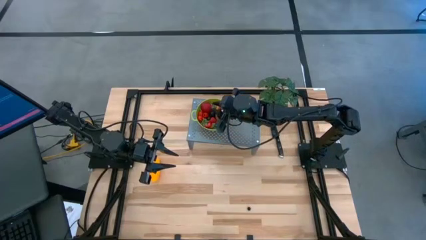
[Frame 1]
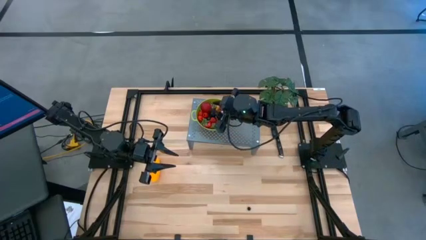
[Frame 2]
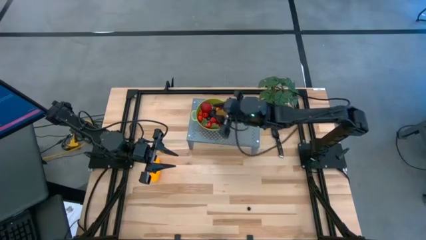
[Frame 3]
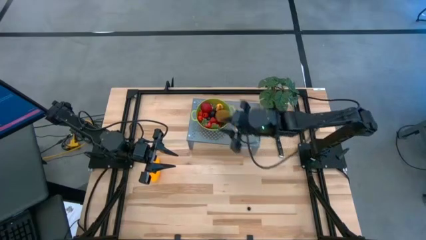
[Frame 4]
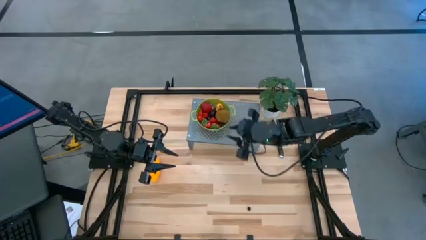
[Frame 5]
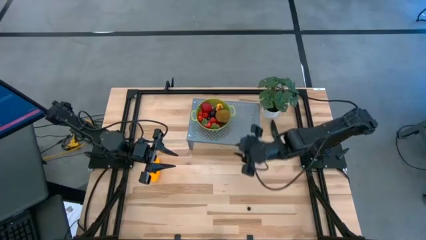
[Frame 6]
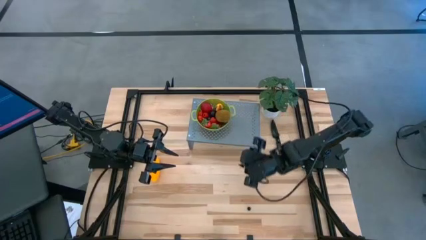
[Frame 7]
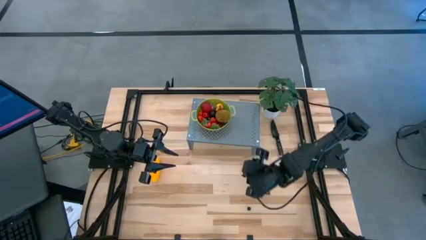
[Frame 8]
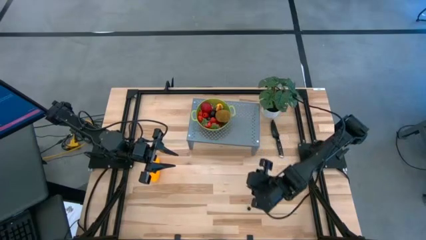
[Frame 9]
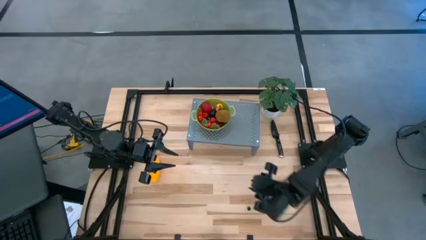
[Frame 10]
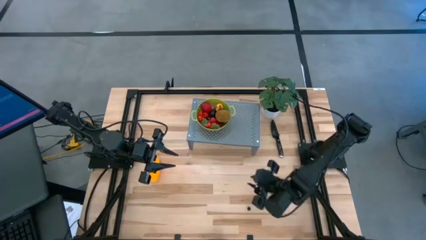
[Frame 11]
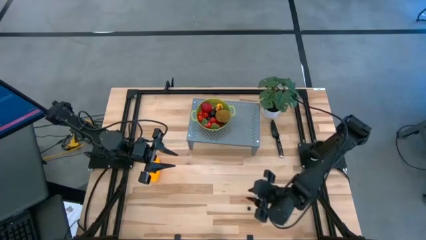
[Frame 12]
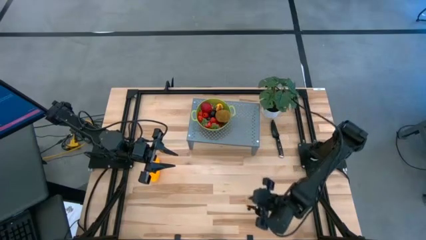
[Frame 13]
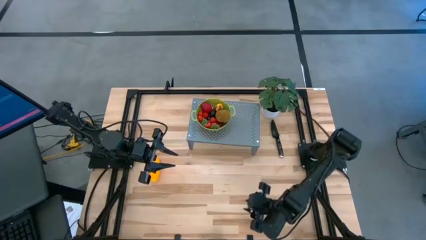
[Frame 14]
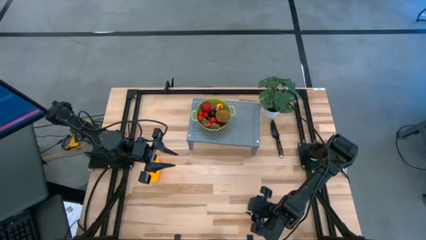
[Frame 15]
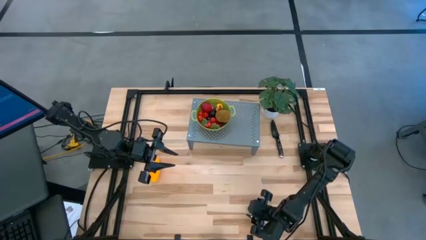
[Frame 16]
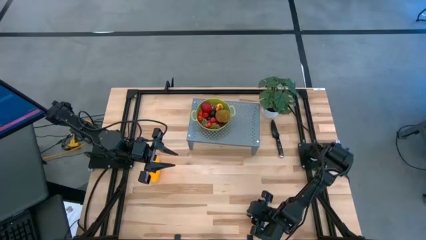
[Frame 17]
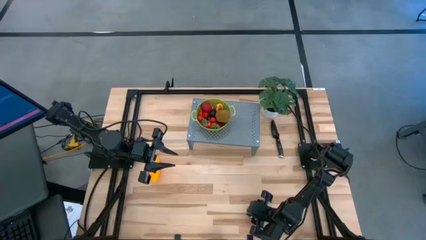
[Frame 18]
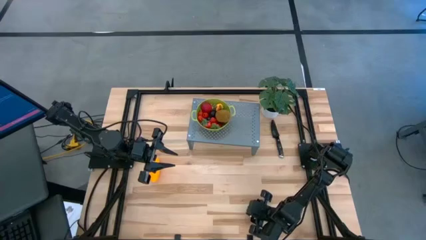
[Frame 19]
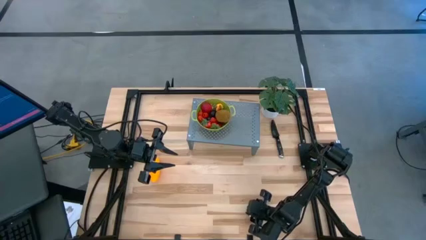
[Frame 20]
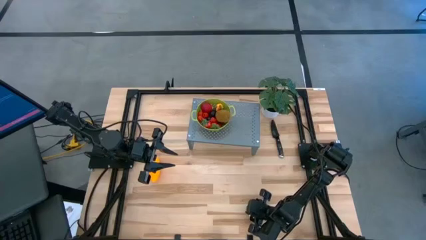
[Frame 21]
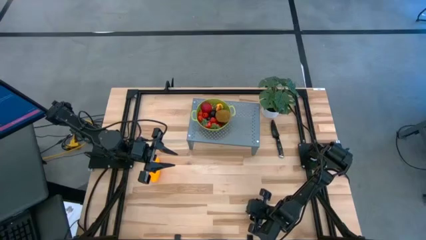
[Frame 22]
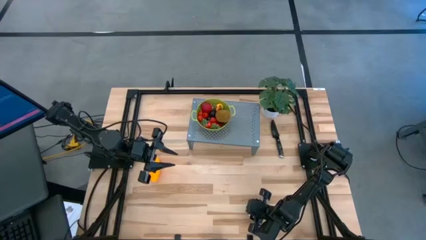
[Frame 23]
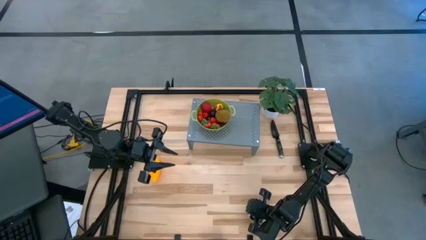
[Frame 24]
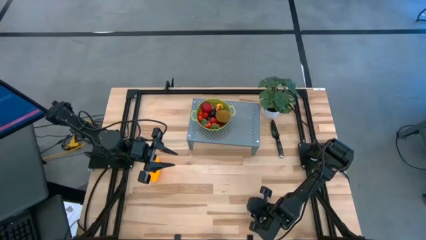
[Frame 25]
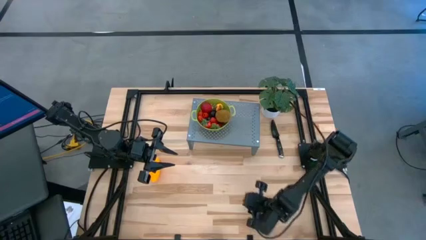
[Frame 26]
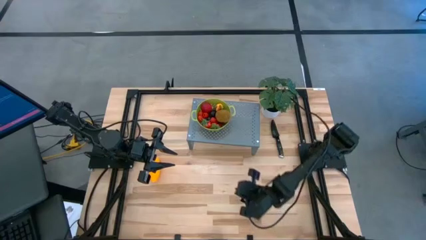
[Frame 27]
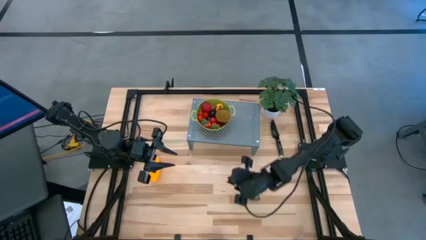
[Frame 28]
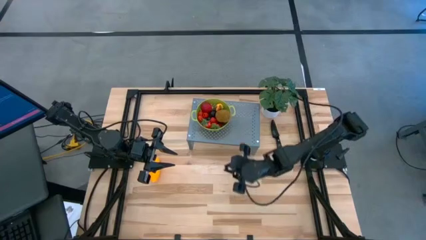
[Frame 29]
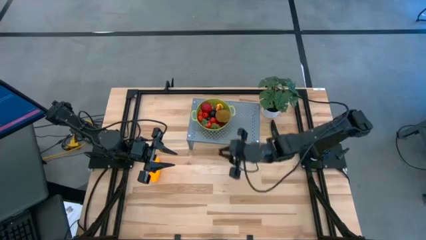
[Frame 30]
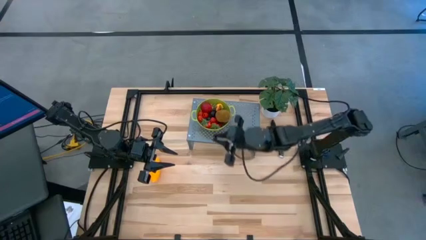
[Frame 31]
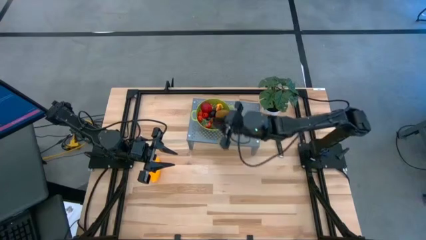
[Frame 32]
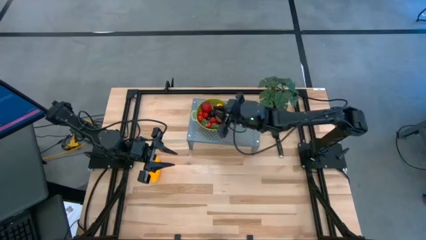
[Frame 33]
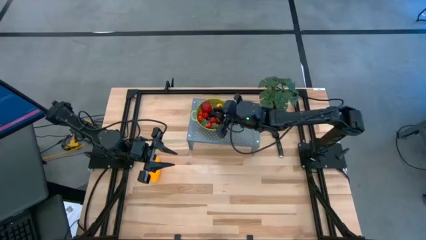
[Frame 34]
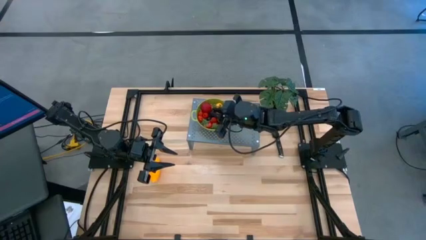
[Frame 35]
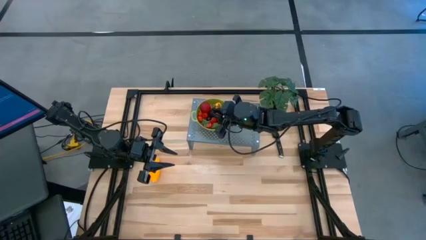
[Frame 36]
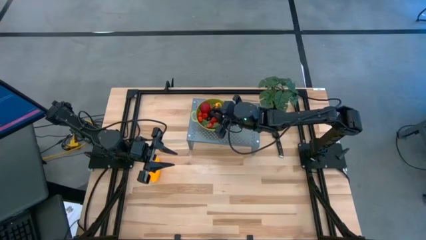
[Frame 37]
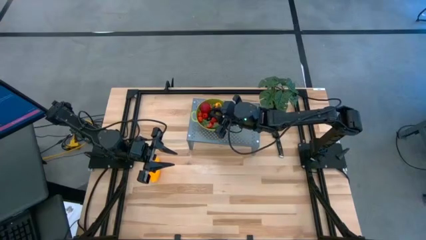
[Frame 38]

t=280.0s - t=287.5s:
Task: Pick & Place Fruit
Put the blueberry into the green strainer bowl on the shelf

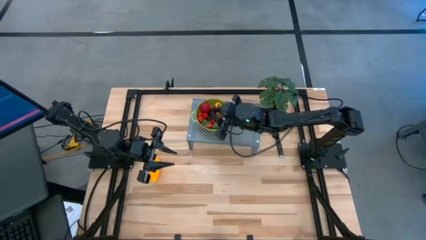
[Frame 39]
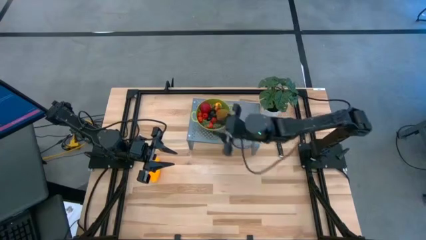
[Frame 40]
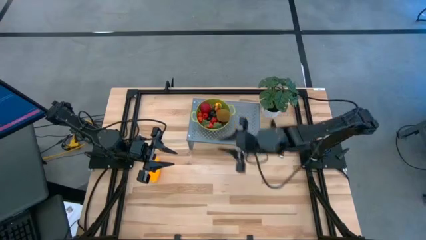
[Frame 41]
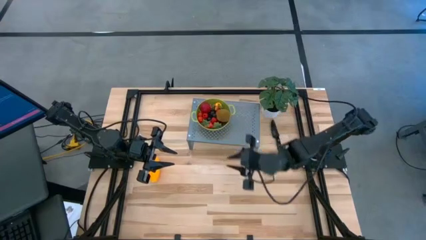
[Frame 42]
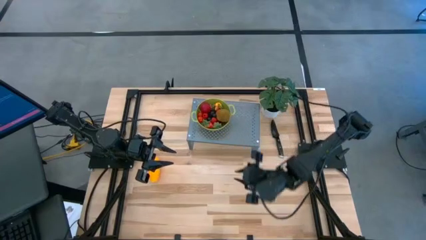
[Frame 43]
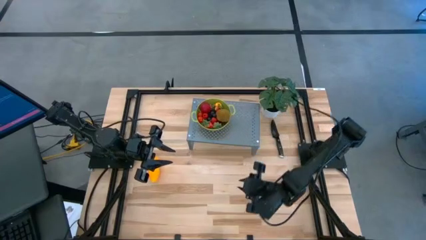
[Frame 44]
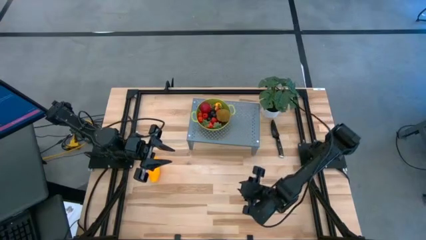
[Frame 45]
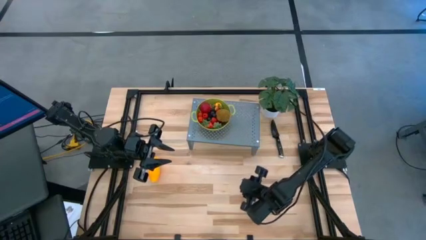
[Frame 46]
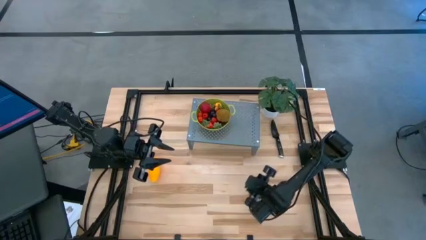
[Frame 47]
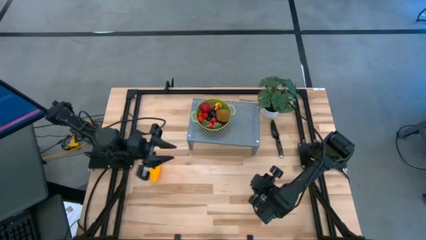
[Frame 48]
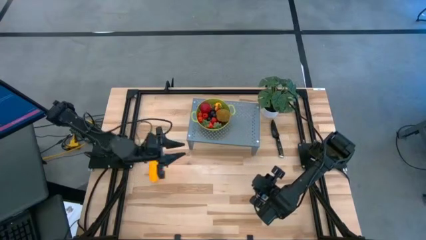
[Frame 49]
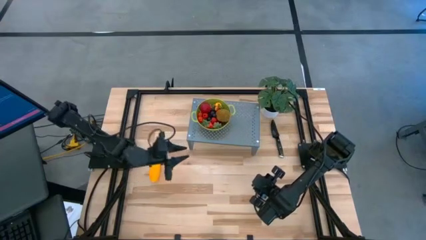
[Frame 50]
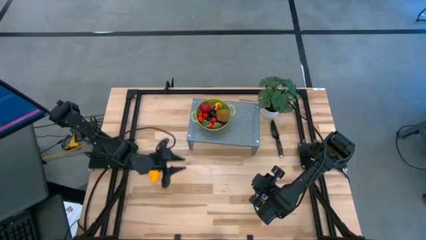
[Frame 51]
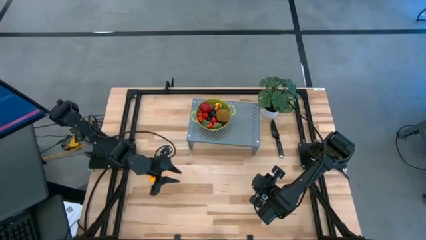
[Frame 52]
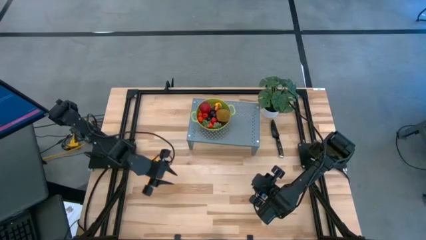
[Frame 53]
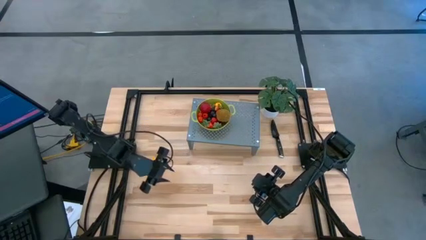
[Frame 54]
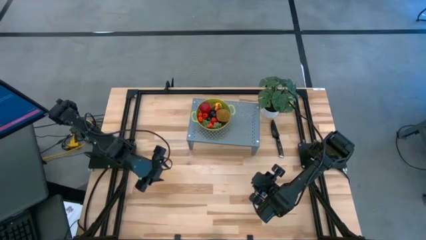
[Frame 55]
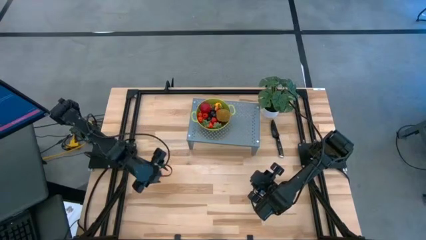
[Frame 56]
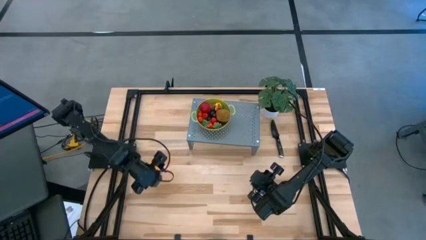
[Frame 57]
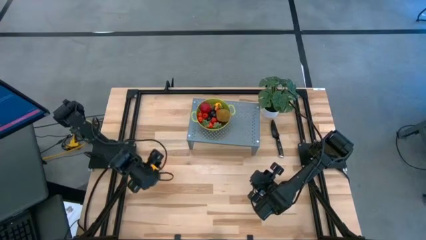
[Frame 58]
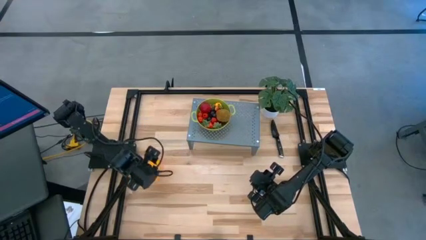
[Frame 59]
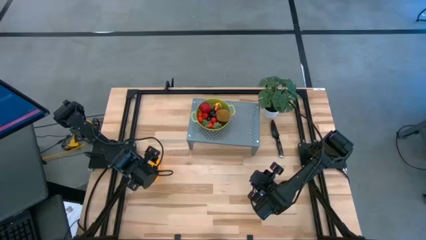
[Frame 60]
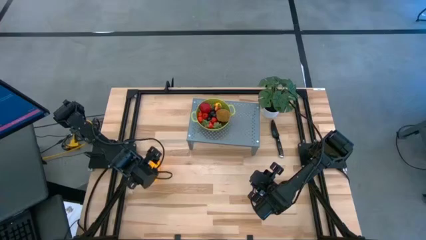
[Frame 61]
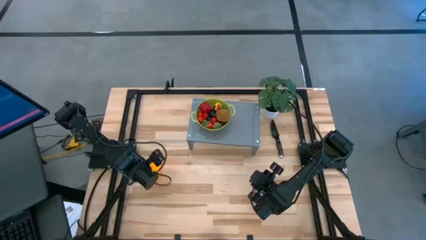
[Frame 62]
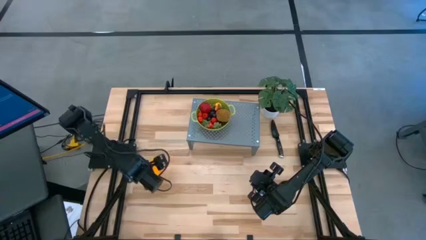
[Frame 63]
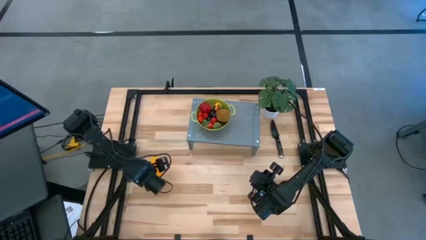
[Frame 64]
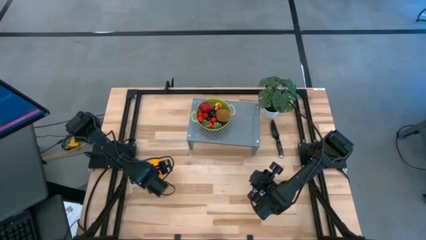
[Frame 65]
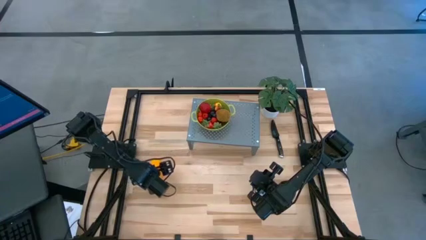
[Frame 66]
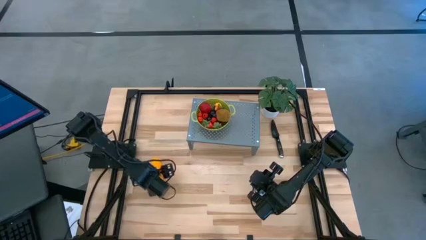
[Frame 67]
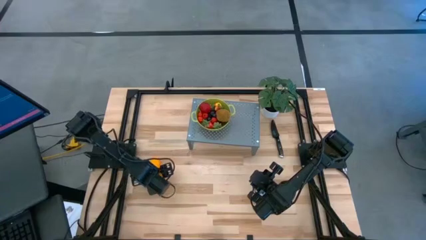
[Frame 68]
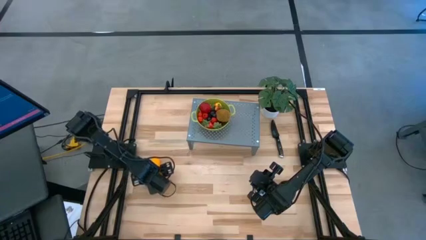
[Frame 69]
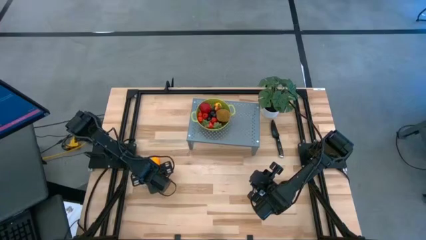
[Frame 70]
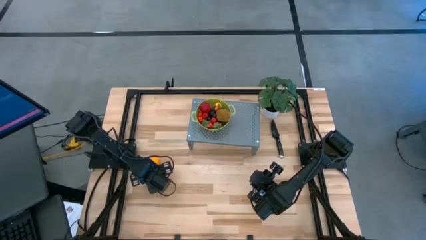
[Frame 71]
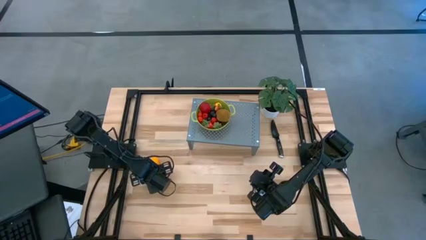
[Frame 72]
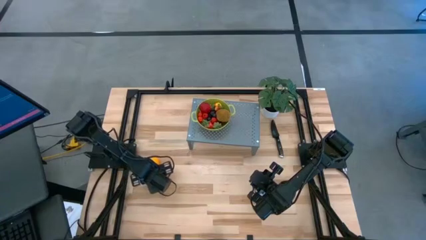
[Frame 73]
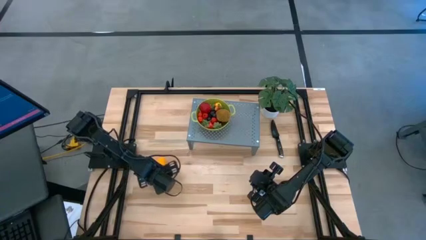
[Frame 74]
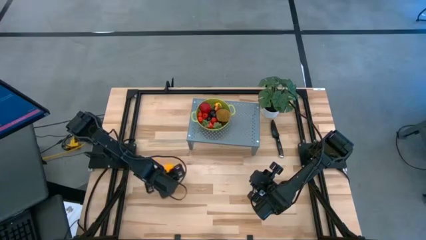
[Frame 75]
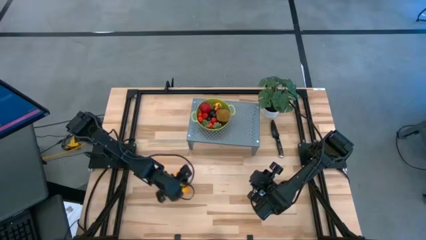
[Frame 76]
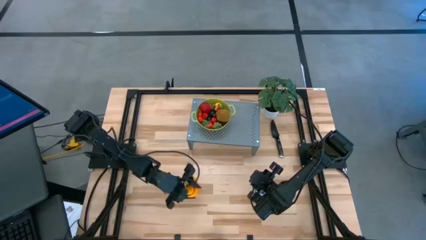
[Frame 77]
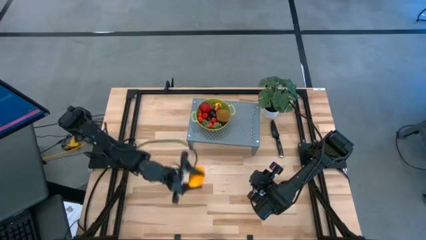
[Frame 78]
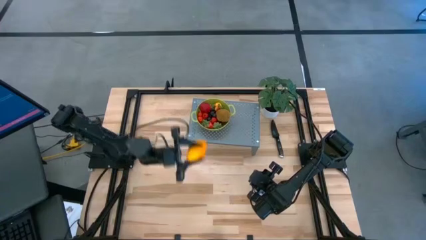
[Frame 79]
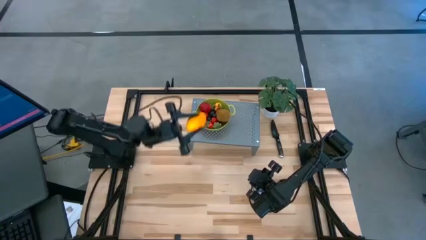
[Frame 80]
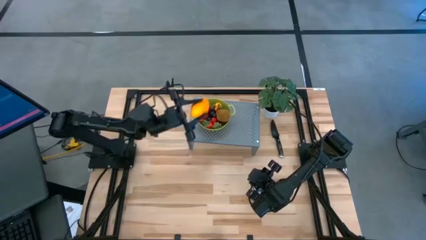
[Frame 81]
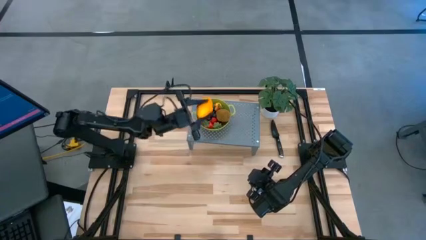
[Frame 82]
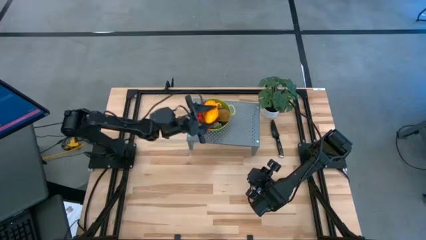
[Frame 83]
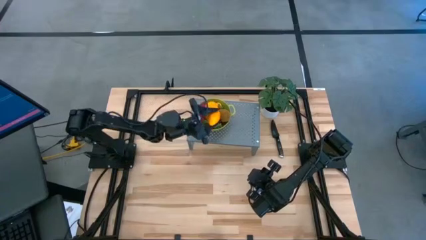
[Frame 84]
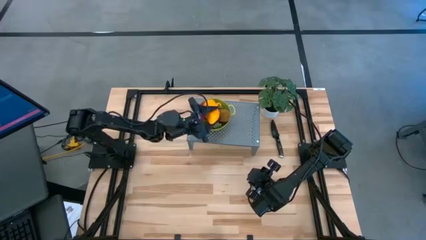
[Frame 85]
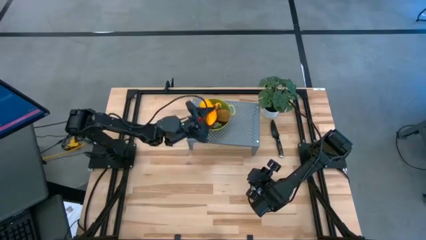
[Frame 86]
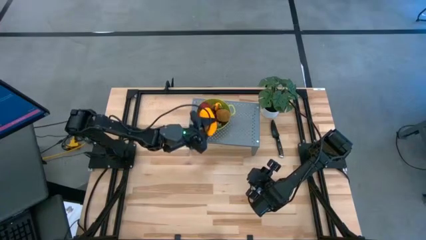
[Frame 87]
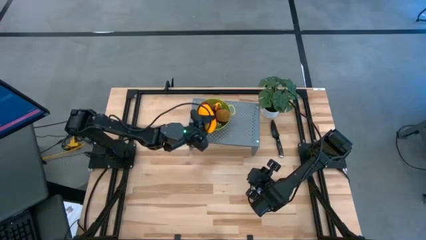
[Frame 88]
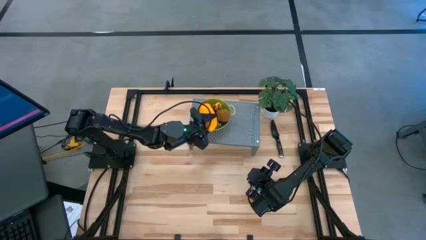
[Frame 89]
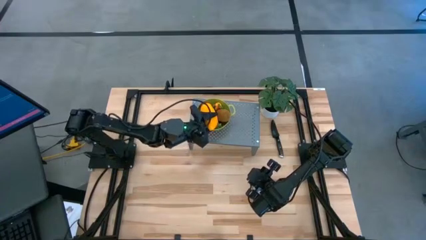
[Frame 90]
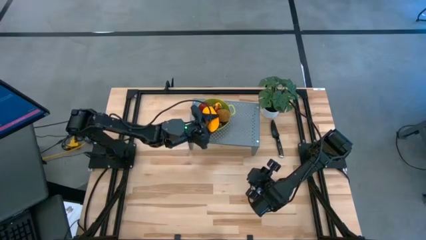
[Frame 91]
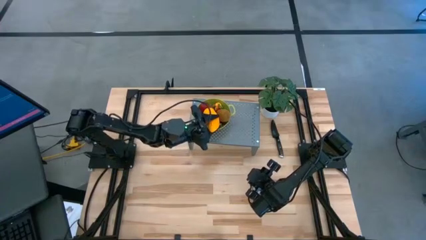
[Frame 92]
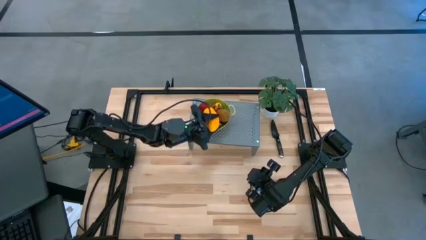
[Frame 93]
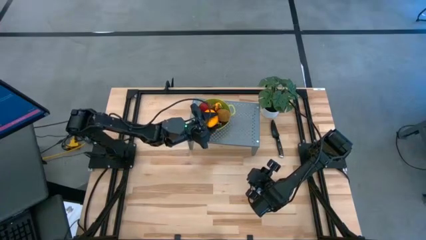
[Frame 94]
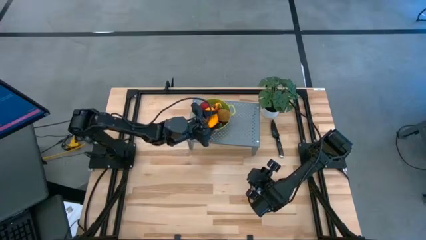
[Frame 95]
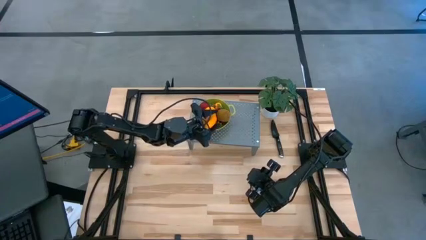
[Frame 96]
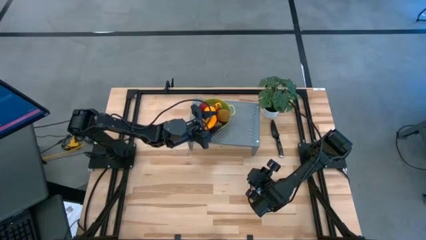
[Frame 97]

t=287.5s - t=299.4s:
Put the mango into the green strainer bowl on the shelf
